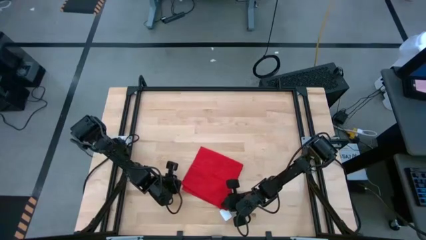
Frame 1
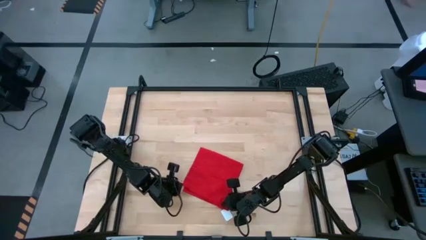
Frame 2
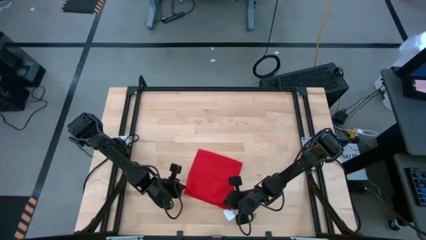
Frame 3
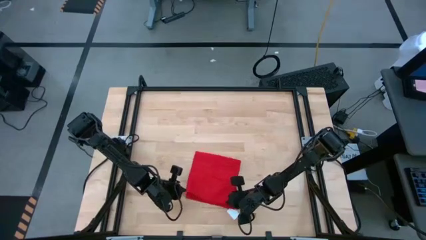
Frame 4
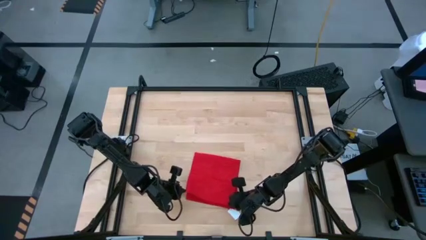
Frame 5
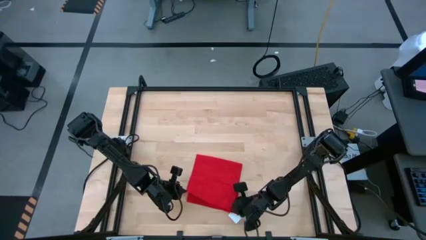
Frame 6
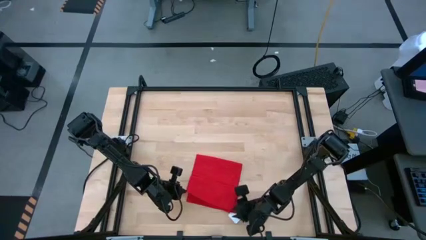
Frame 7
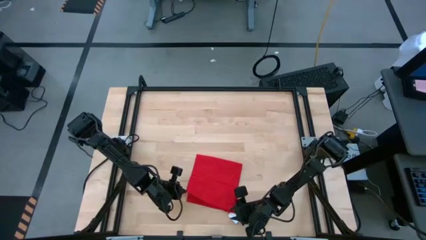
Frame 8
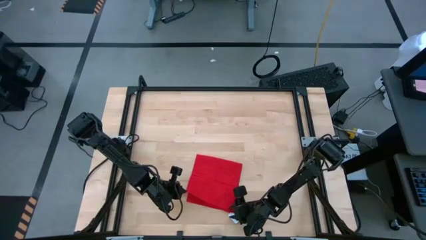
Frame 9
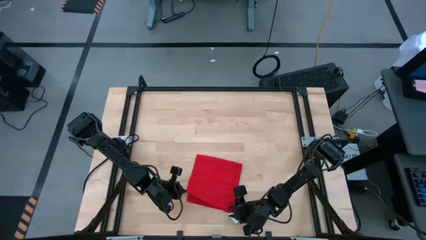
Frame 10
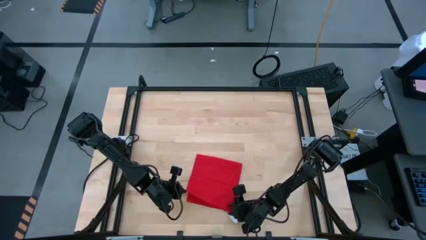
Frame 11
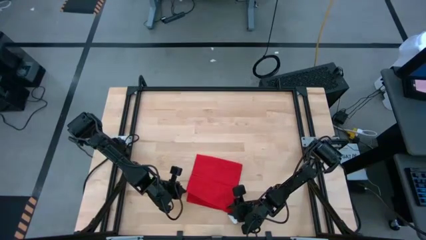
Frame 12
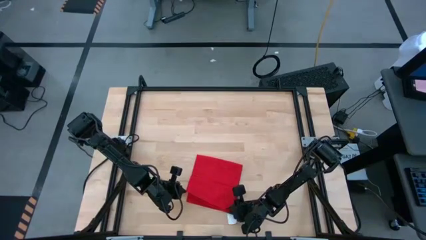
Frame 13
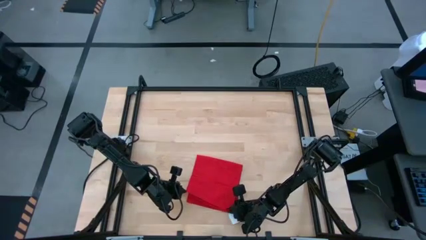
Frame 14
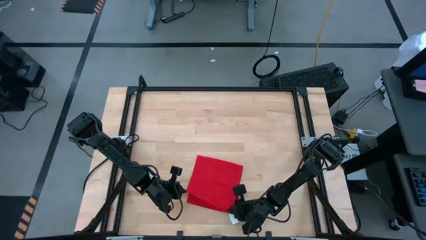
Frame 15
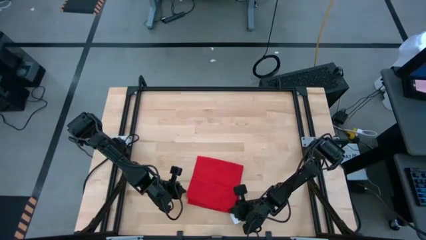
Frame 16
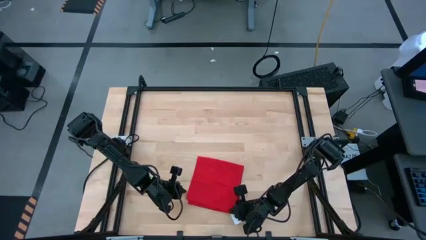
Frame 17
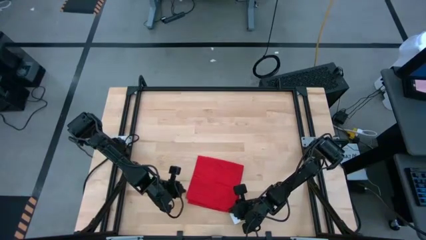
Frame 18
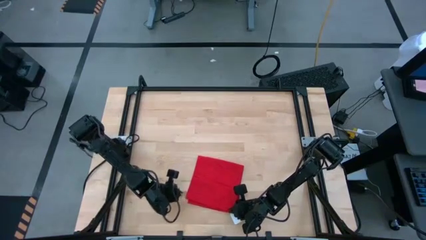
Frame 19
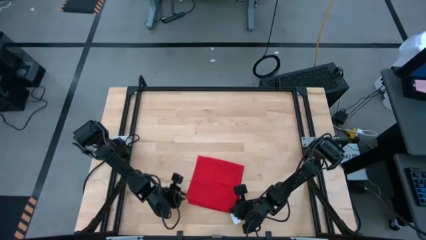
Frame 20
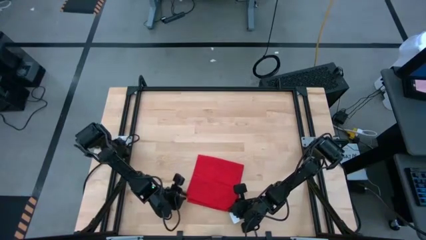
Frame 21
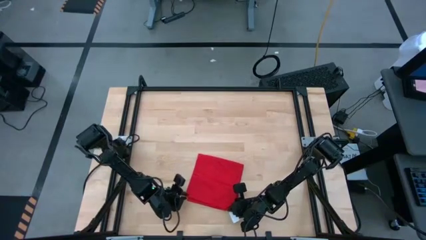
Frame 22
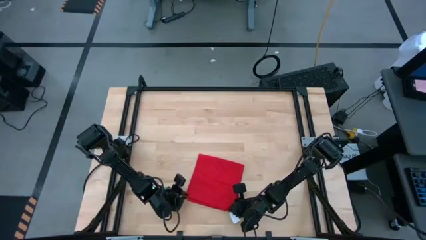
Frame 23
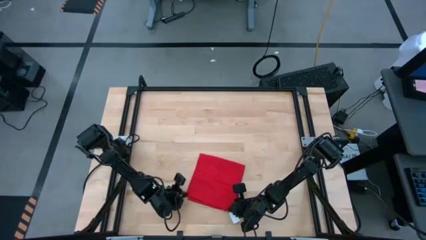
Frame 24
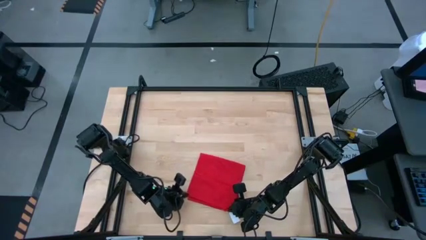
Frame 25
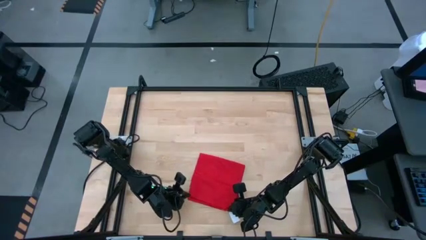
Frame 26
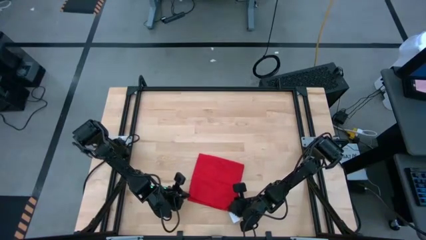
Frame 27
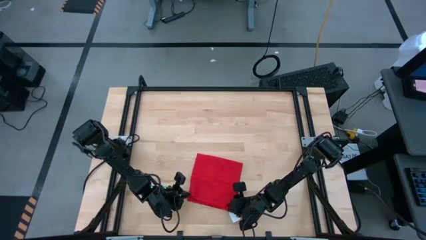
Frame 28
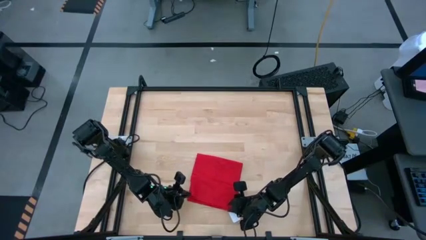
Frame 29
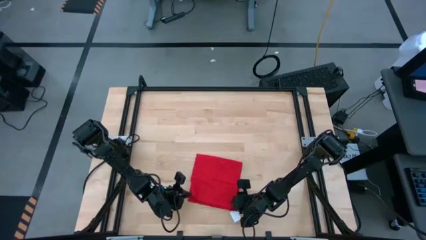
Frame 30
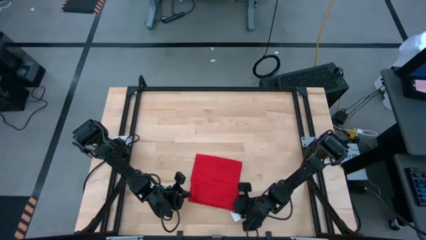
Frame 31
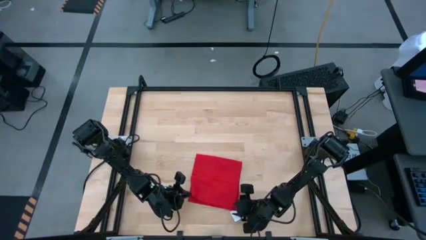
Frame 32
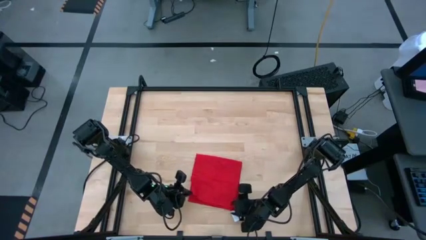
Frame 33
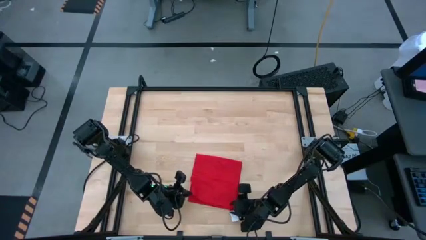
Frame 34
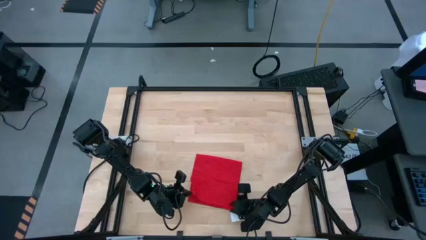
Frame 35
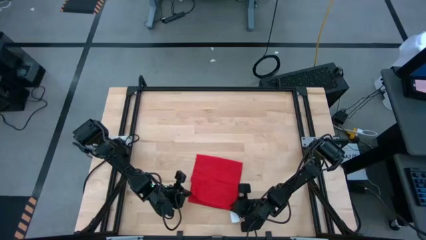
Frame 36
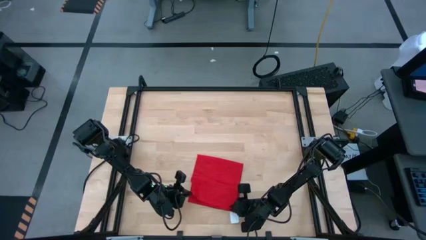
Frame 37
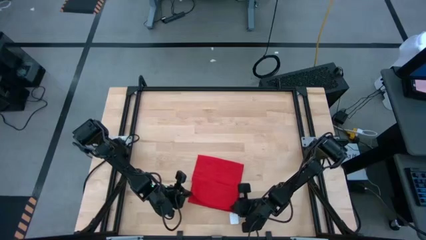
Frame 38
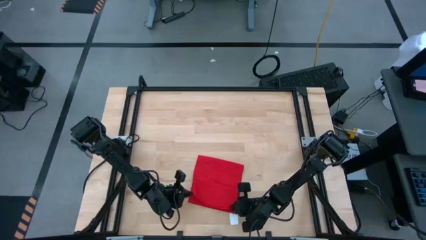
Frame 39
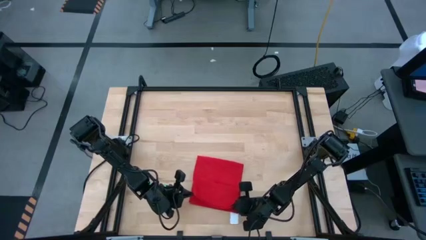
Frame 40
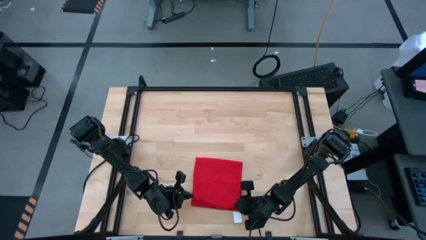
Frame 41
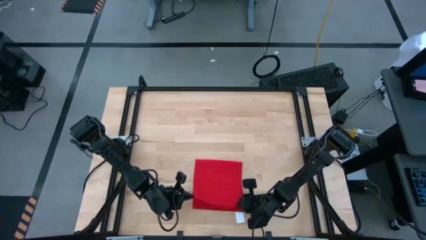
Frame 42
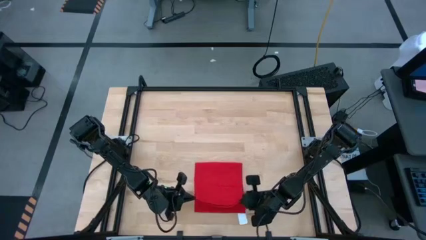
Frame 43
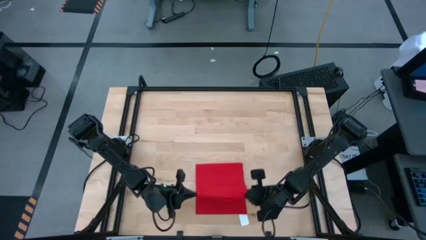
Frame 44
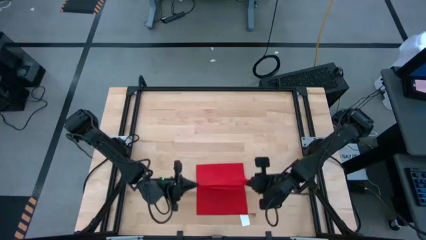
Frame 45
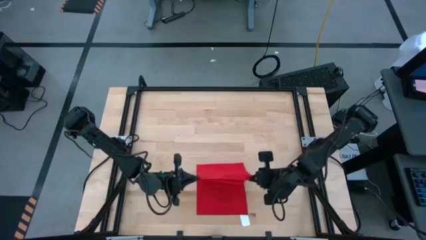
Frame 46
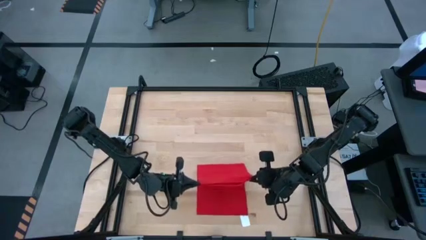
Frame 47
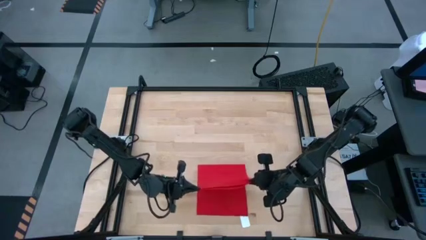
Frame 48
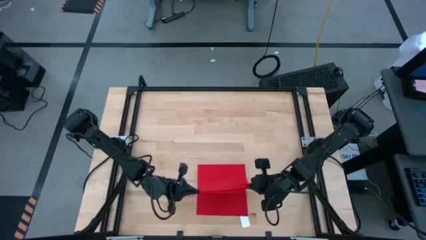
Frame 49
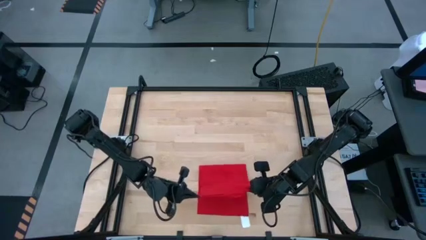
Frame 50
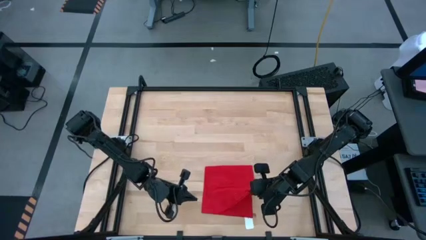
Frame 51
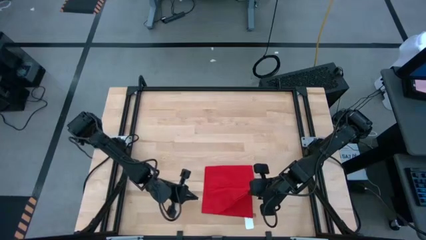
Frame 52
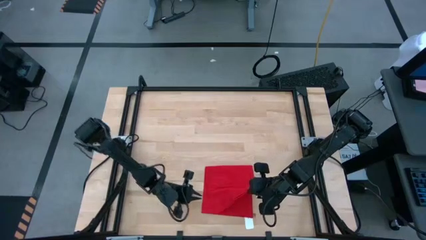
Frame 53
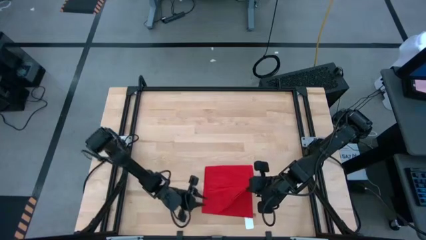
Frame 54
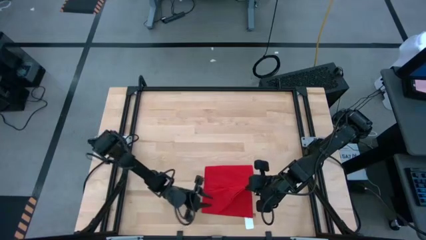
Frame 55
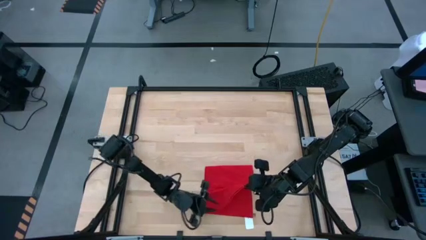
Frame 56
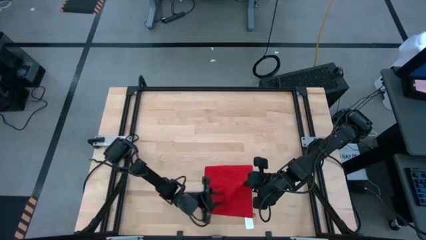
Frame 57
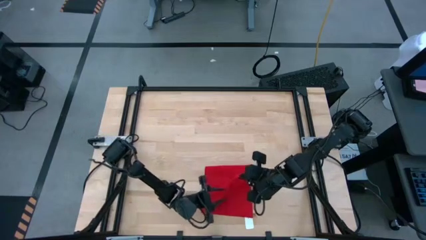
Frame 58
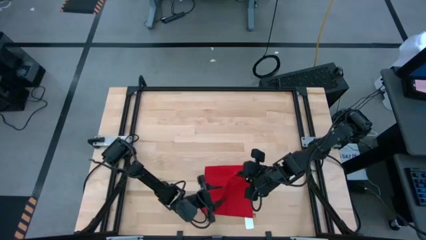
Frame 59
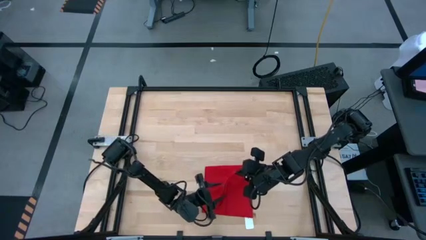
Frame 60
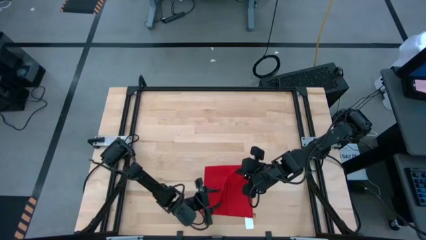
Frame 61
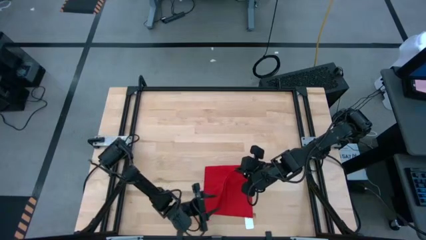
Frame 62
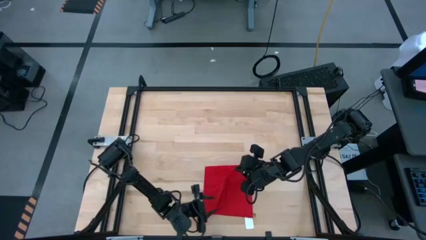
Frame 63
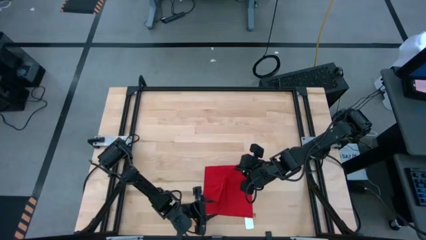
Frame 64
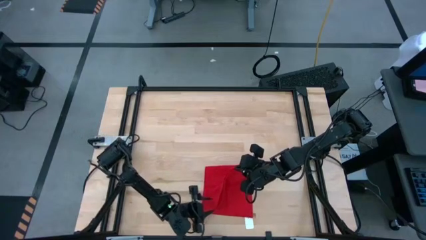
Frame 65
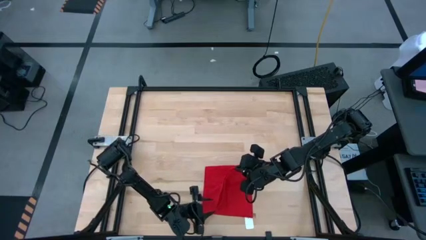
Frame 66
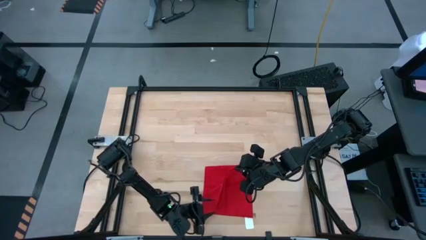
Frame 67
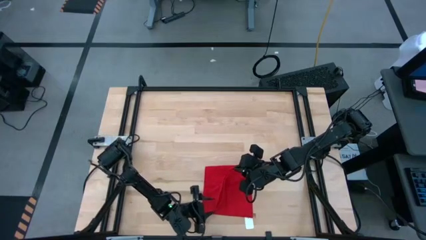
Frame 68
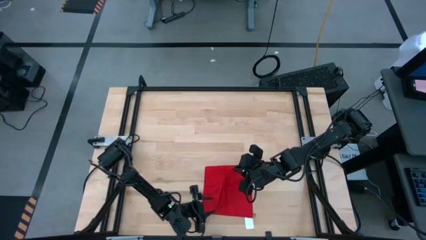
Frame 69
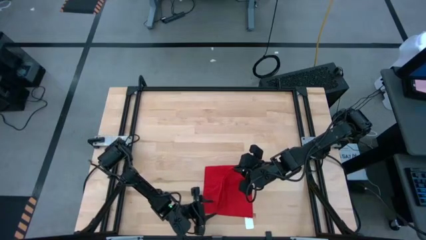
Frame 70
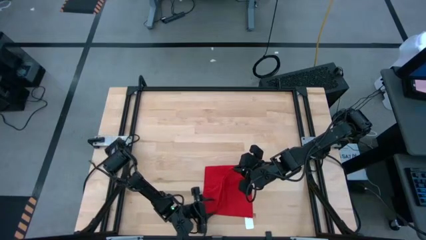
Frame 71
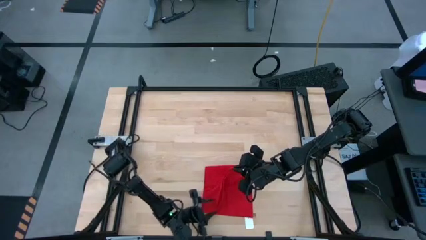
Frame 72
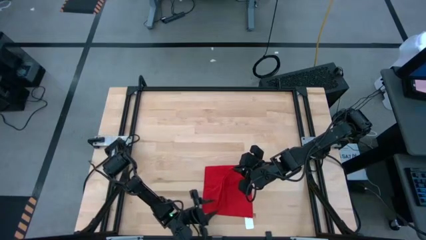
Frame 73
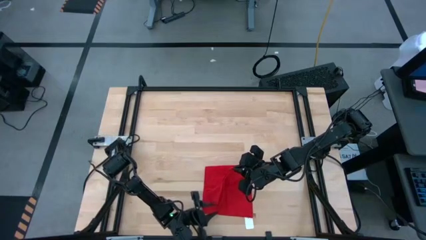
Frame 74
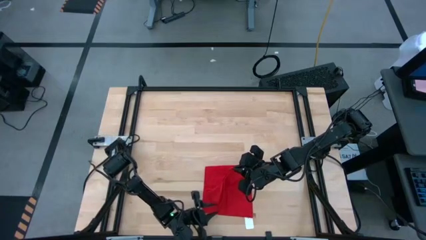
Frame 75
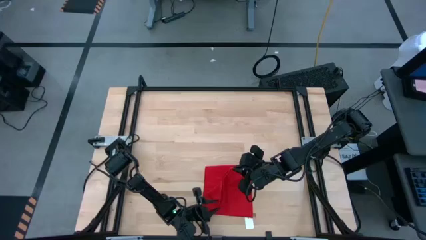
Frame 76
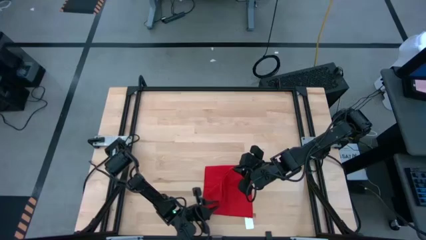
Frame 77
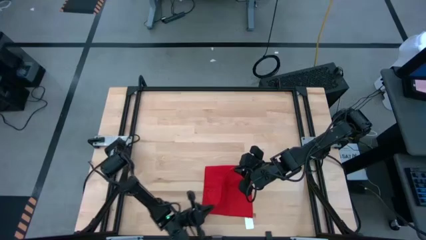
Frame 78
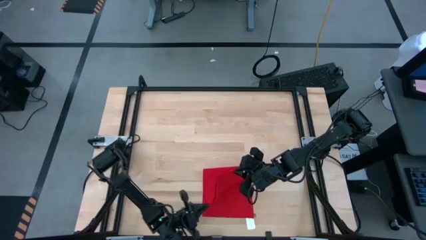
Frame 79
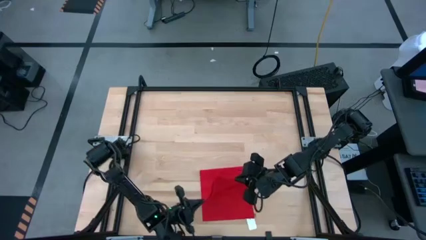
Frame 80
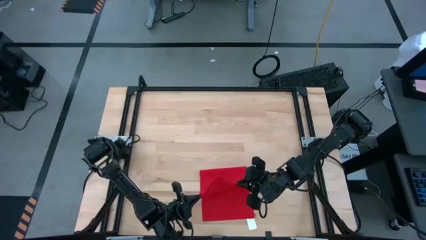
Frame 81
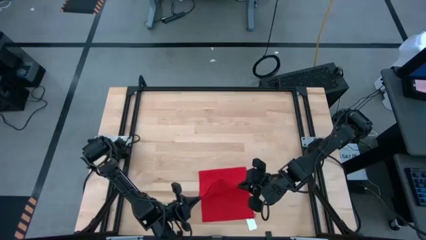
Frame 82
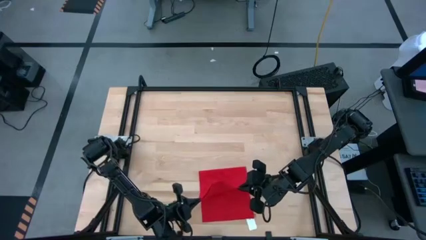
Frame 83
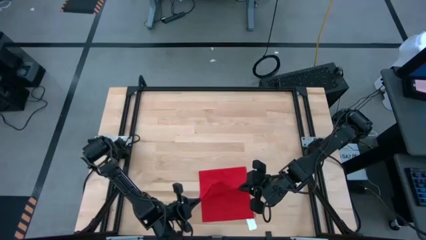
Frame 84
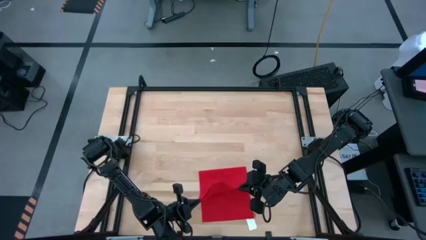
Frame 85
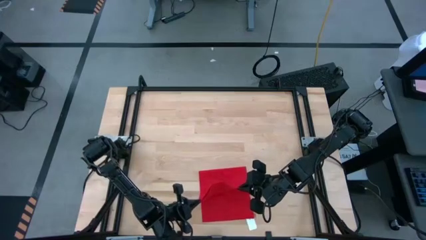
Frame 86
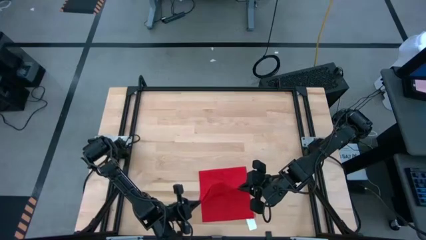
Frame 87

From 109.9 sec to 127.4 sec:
Task: Roll napkin
Fold the red napkin
